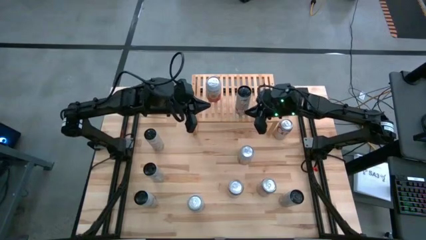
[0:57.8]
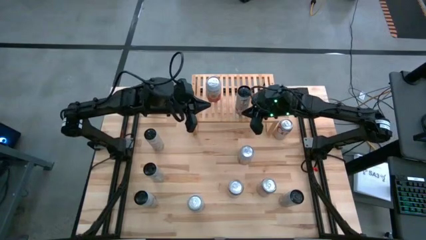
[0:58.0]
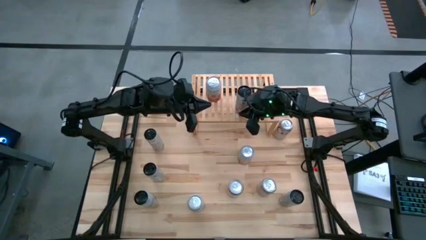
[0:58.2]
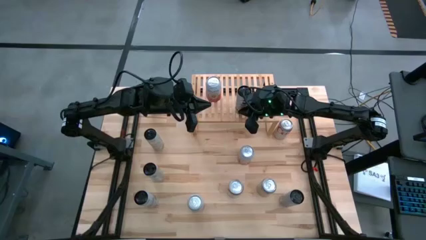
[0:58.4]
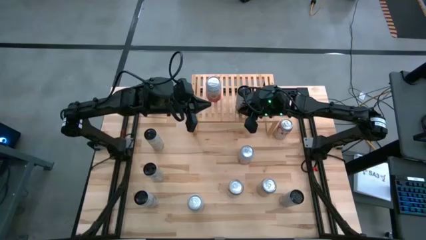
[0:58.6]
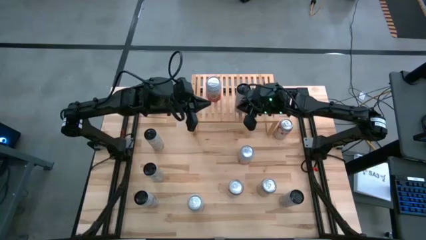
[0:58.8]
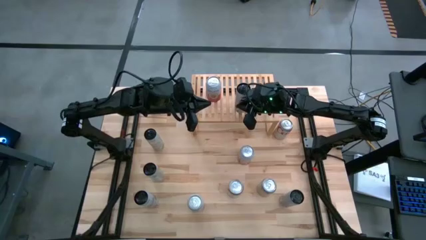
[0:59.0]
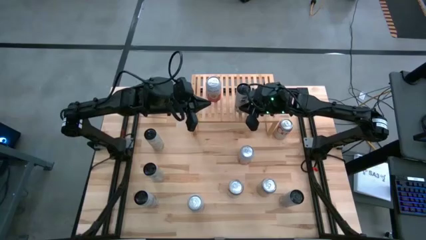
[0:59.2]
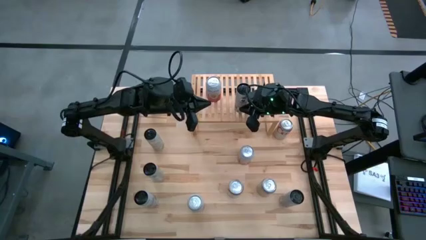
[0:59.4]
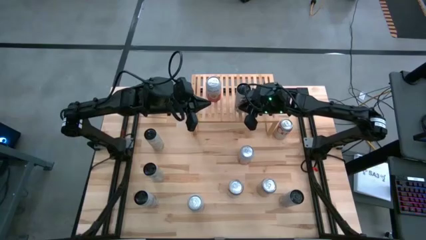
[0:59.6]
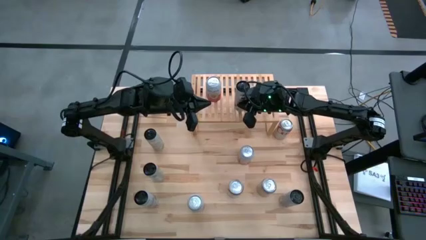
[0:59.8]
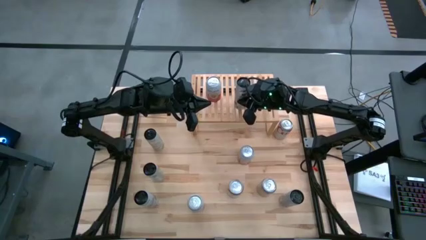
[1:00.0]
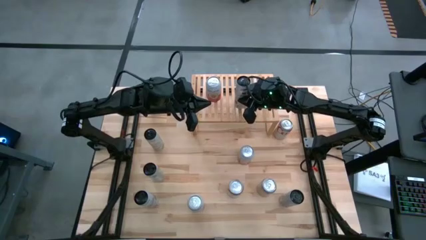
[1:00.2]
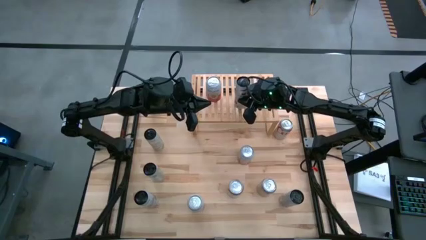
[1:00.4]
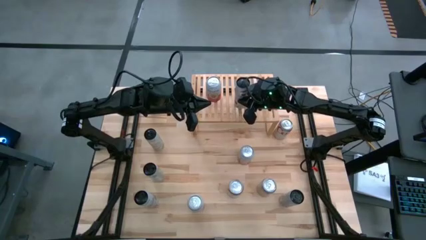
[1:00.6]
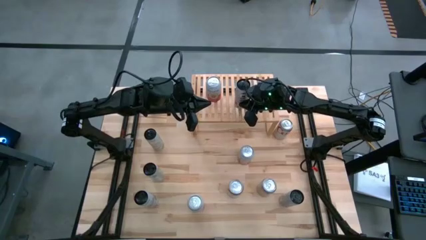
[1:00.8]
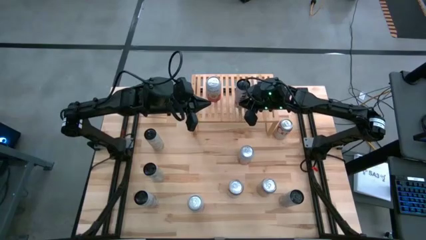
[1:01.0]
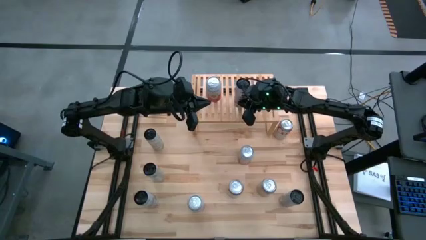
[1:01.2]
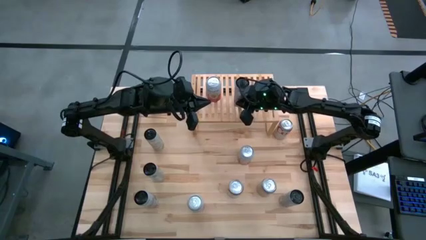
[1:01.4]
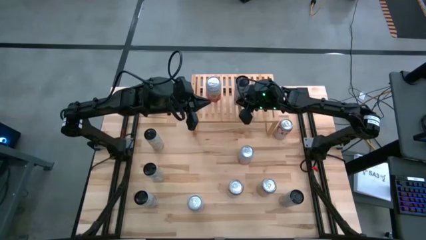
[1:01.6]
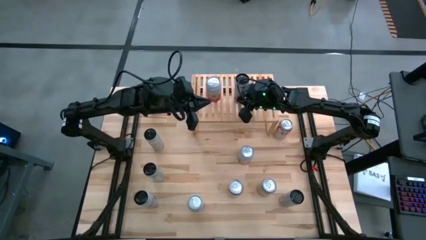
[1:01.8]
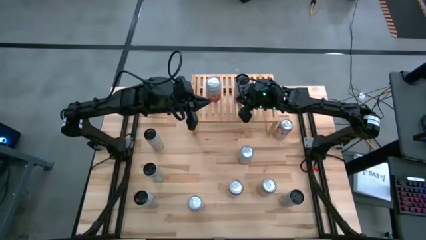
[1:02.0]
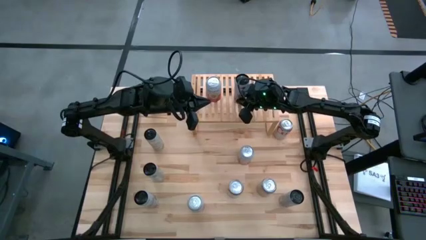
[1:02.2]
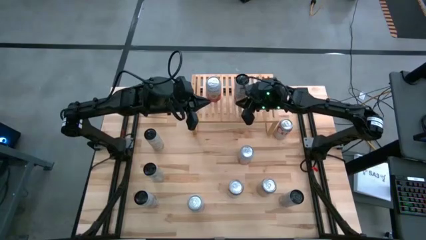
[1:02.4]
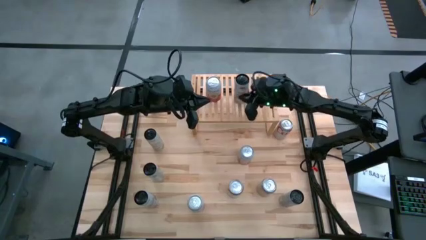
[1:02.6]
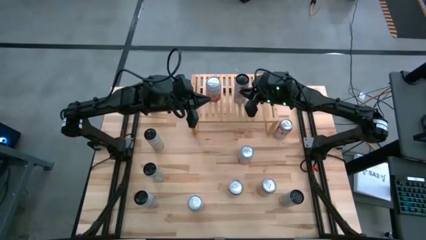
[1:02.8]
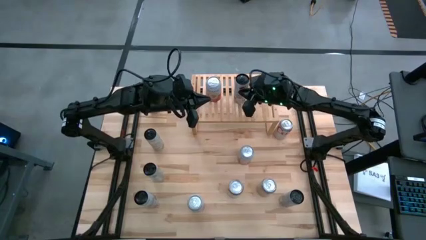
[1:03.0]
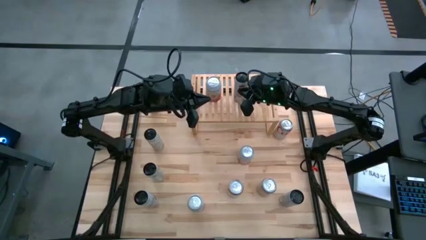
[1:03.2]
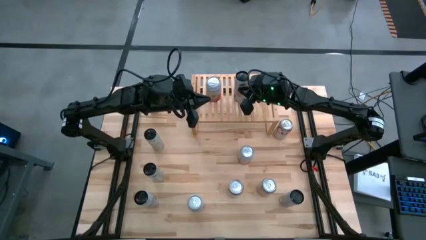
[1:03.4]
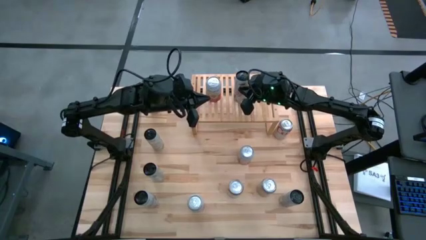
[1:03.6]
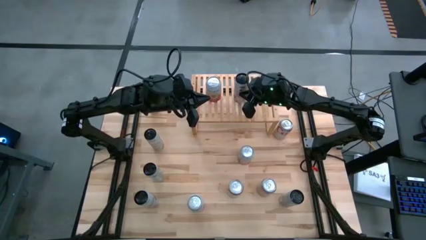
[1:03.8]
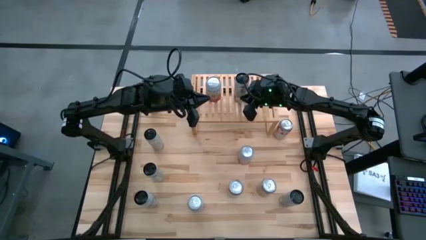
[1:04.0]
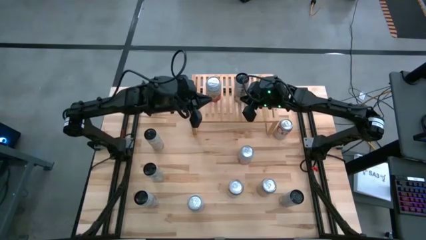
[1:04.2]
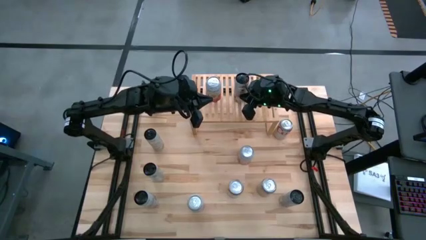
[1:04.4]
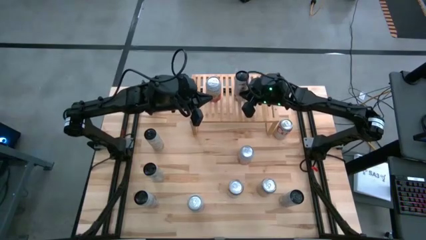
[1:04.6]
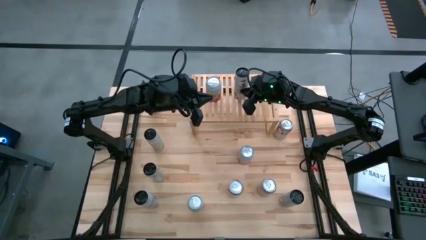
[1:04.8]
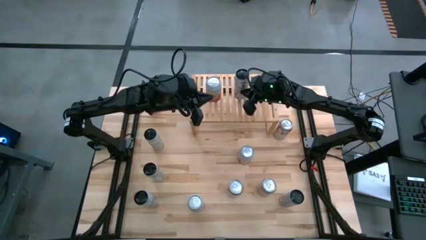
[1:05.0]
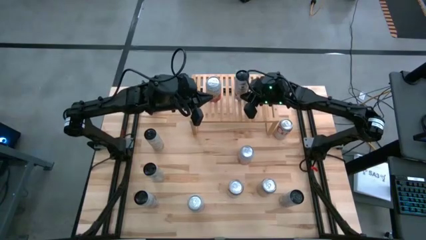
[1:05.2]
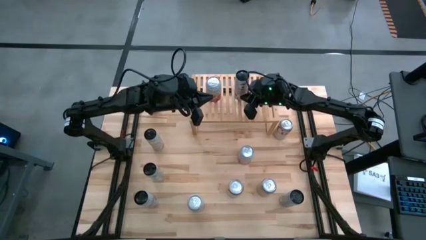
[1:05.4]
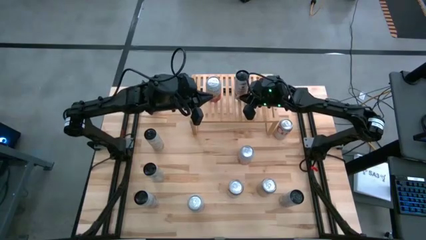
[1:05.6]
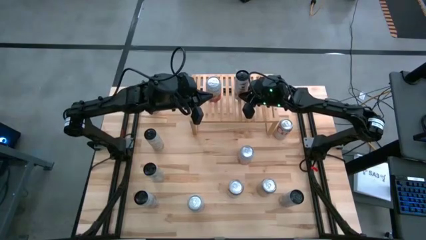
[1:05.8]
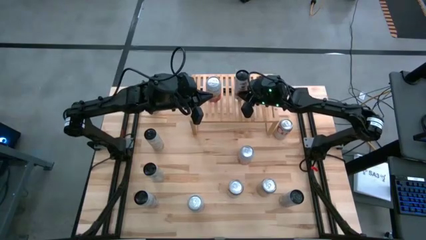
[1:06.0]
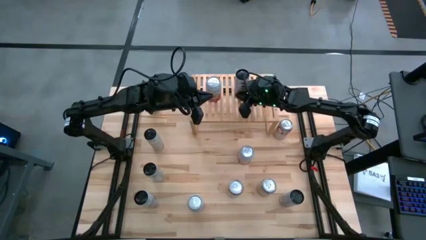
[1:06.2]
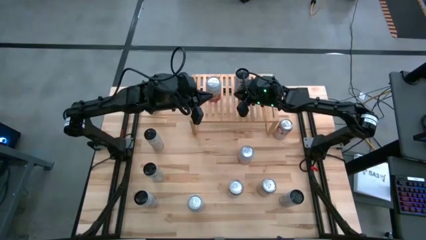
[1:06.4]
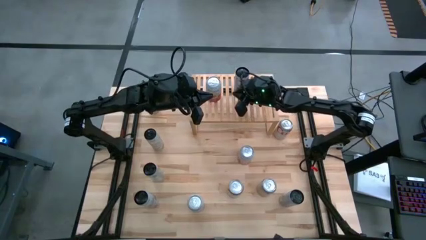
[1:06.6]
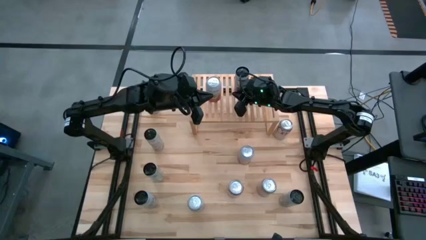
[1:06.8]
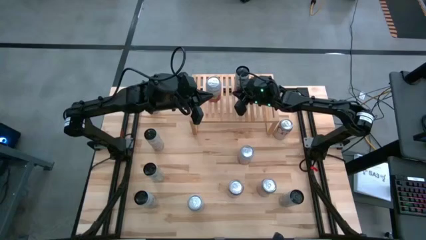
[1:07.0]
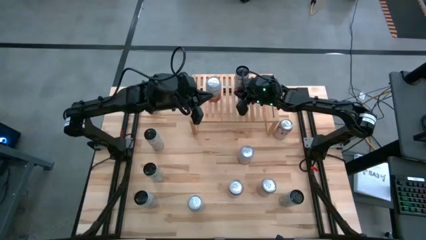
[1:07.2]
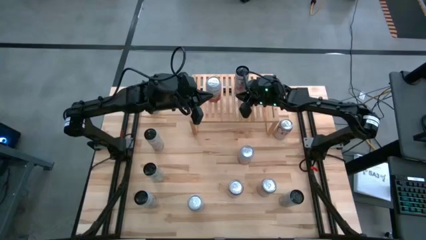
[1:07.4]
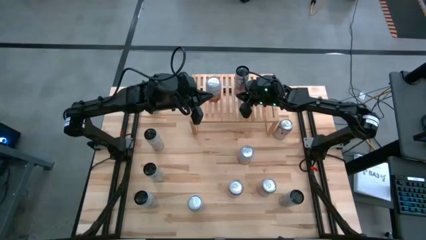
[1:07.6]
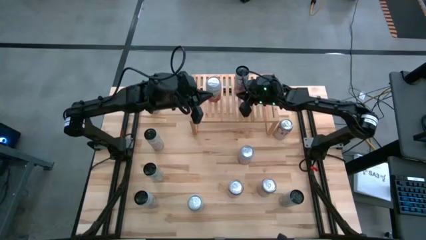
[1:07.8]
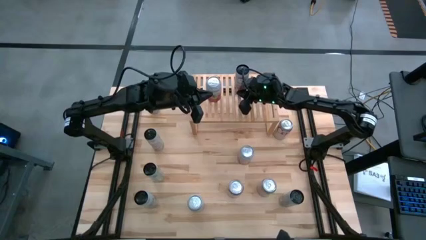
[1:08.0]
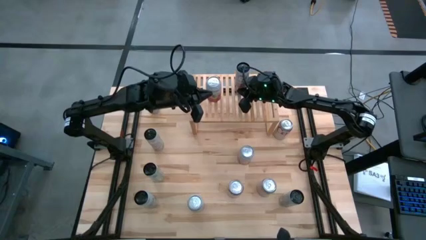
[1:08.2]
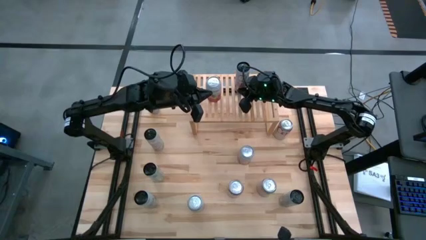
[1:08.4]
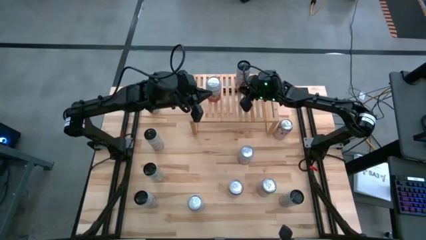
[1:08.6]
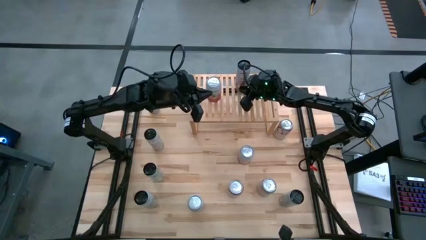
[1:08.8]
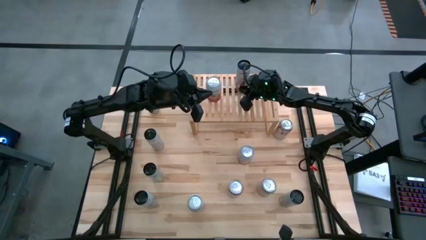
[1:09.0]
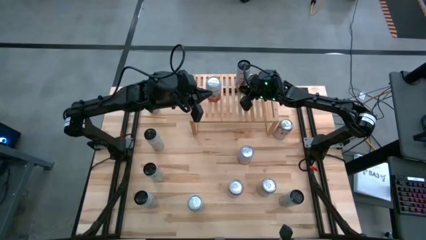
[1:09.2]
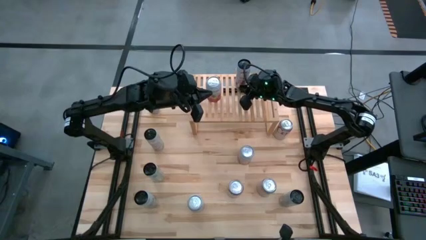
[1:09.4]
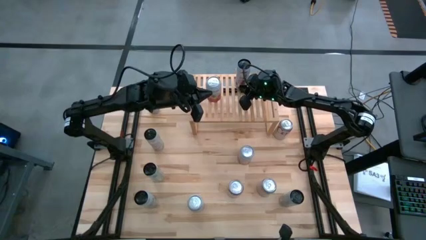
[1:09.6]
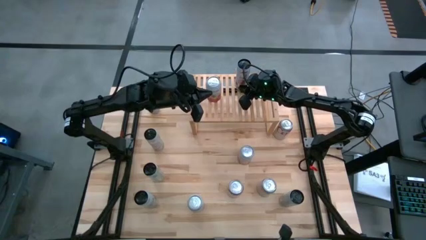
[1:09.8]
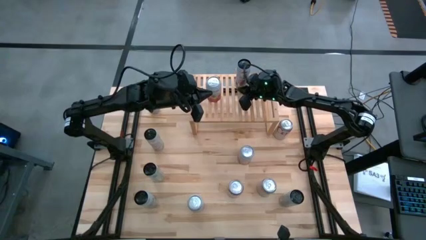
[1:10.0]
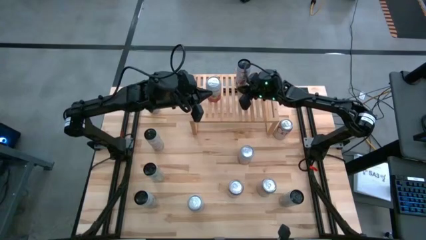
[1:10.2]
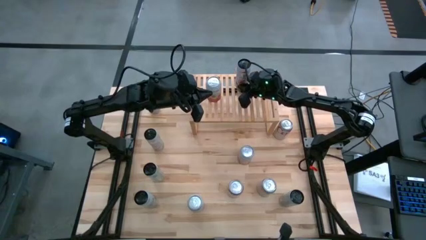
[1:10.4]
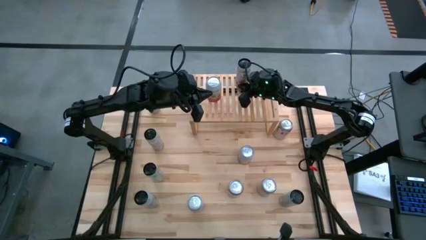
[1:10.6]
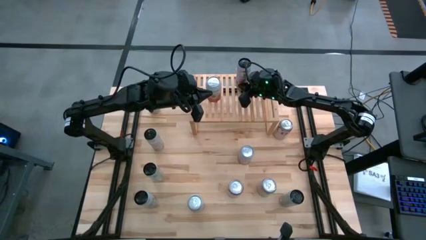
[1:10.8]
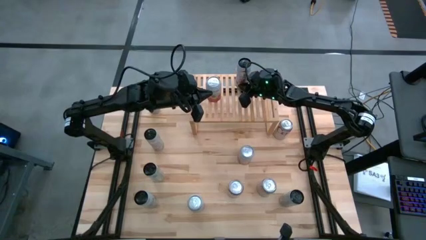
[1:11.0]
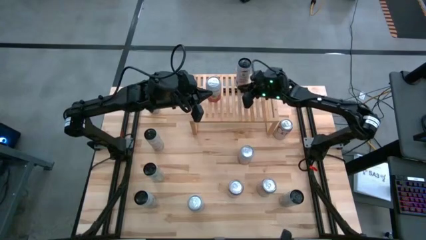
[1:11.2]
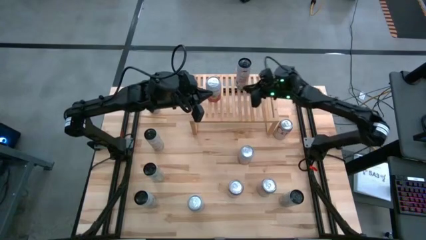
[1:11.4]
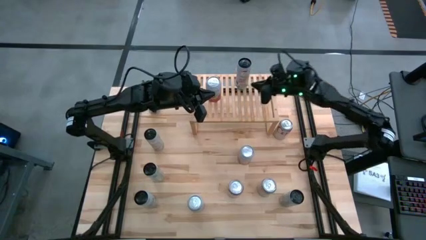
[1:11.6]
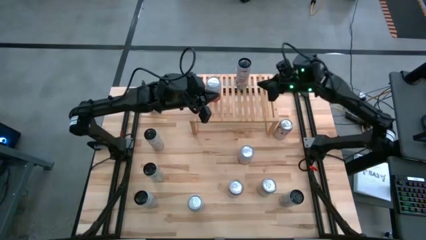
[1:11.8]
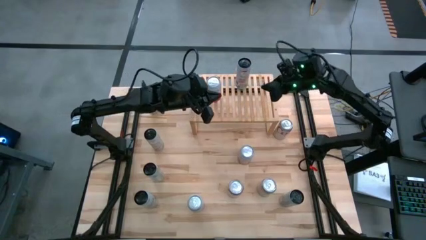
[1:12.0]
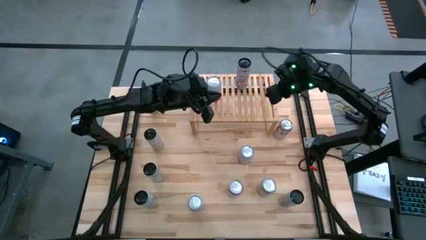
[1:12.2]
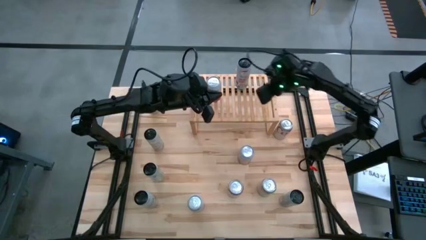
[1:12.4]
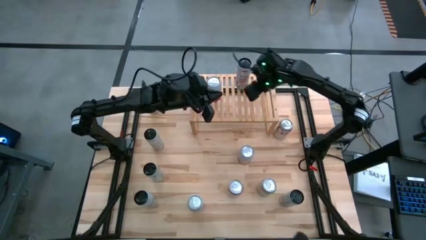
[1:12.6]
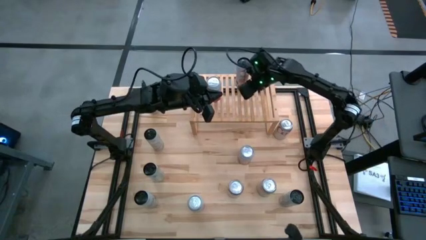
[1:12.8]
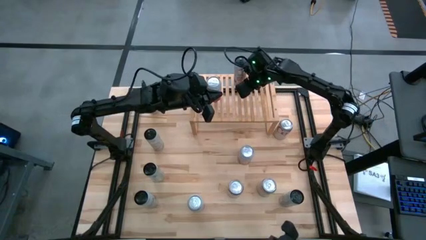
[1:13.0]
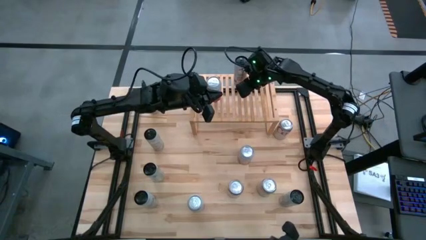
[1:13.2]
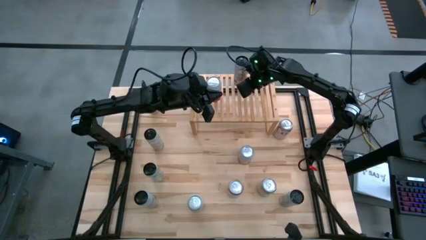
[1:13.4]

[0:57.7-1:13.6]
Task: Place canned beverage on shelf
Put the center white soda can on the shelf

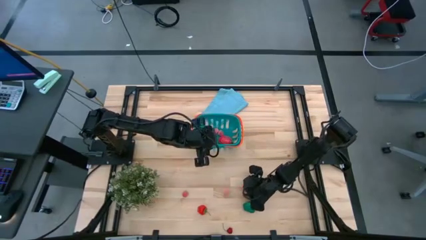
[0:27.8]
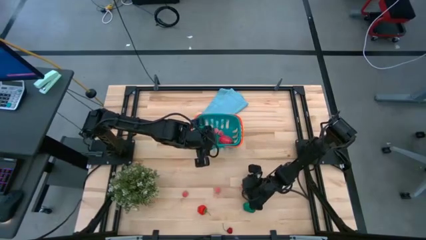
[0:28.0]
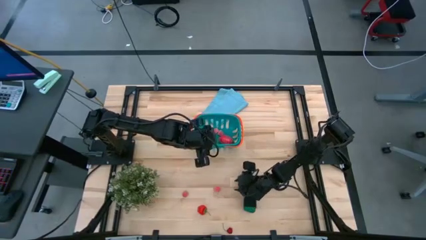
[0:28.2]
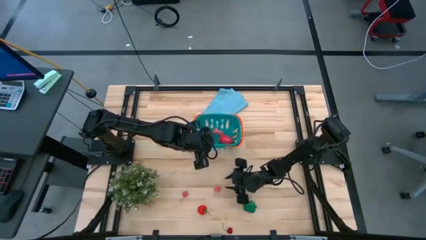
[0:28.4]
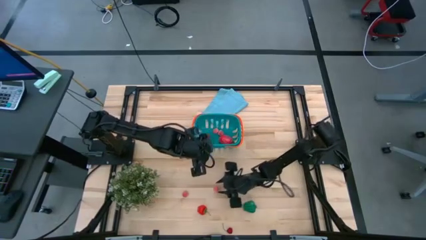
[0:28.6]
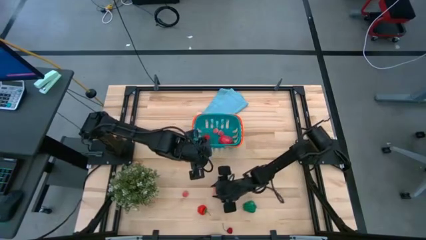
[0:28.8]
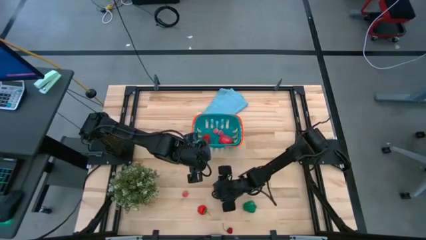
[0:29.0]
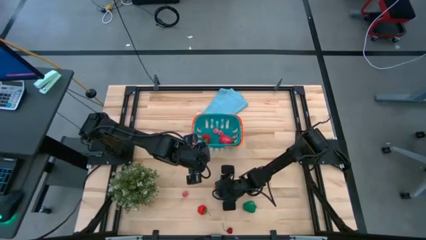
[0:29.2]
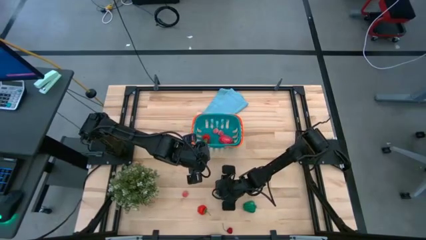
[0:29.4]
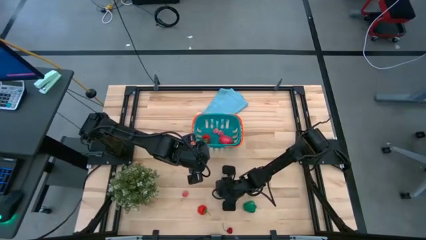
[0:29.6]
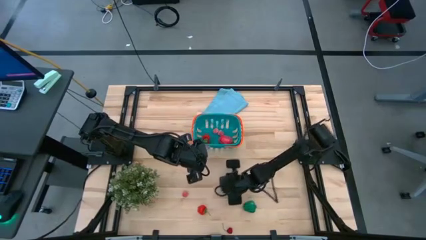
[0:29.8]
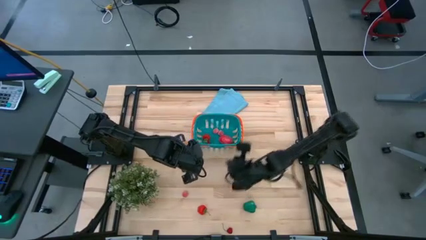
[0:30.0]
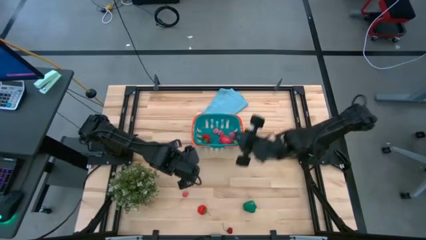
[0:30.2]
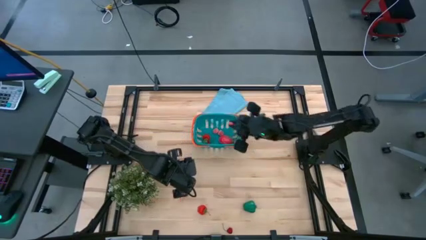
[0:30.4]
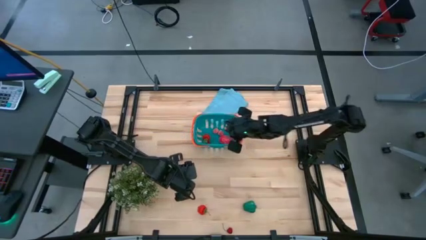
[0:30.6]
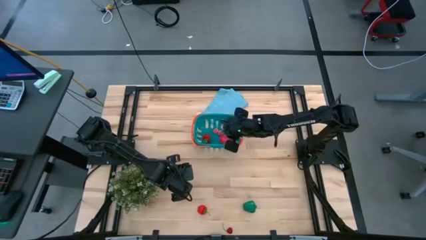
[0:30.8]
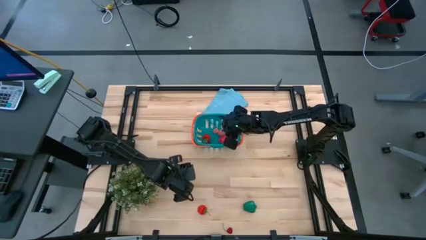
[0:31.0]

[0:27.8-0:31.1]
Task: Pick and placing Produce into tupperware
Put the pink peach into the bin
